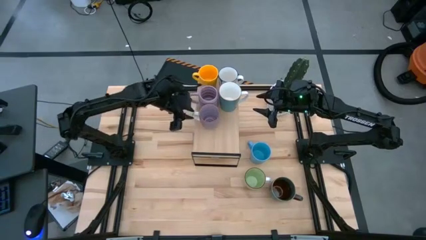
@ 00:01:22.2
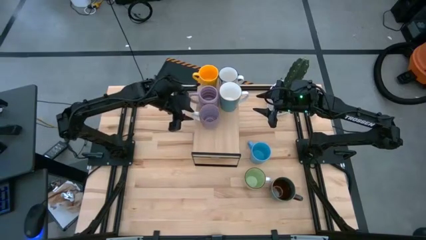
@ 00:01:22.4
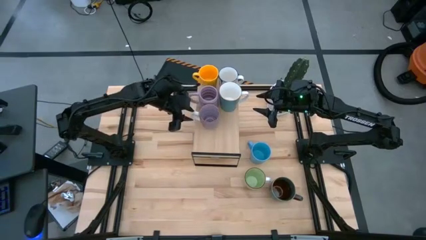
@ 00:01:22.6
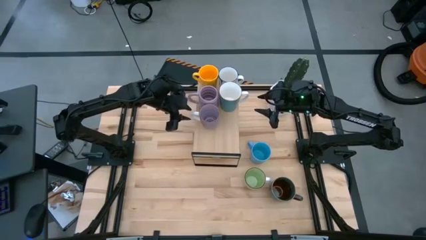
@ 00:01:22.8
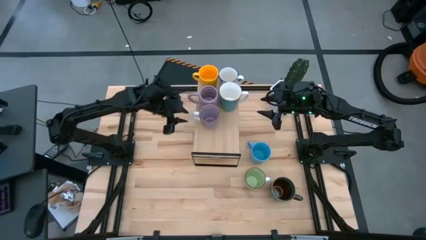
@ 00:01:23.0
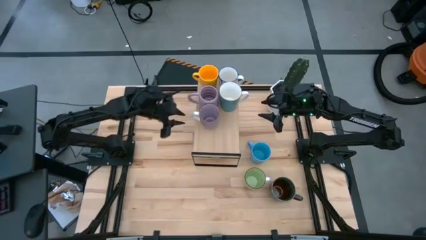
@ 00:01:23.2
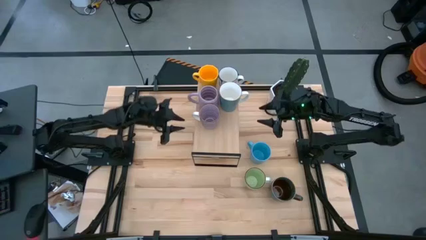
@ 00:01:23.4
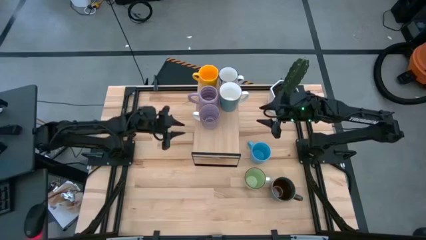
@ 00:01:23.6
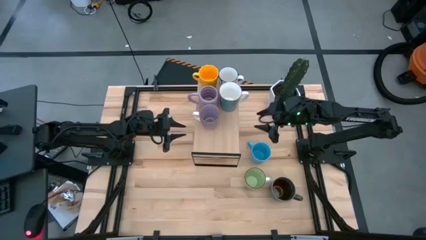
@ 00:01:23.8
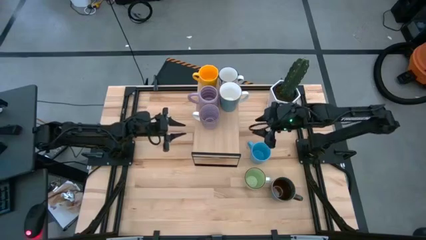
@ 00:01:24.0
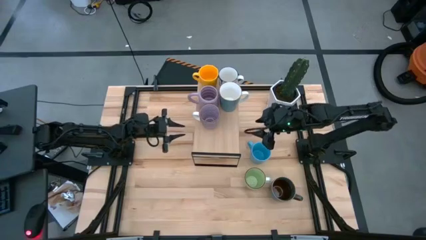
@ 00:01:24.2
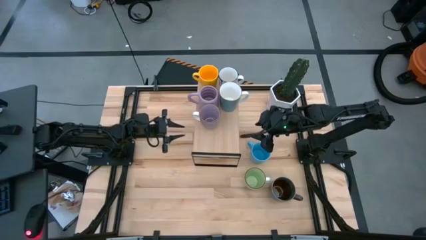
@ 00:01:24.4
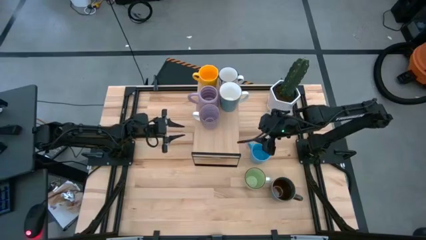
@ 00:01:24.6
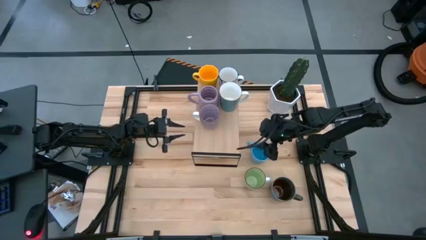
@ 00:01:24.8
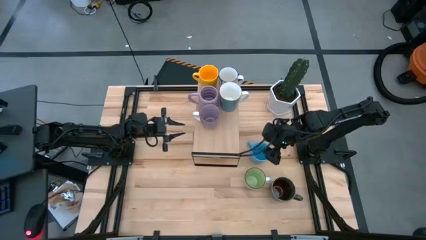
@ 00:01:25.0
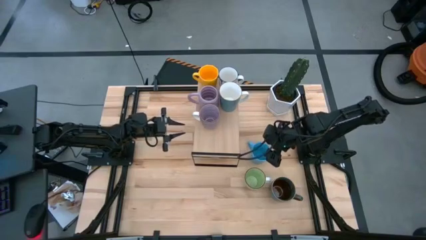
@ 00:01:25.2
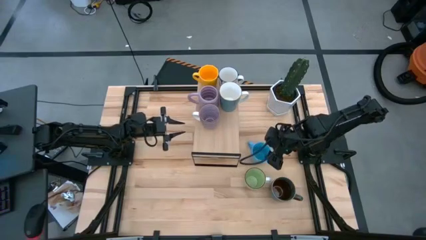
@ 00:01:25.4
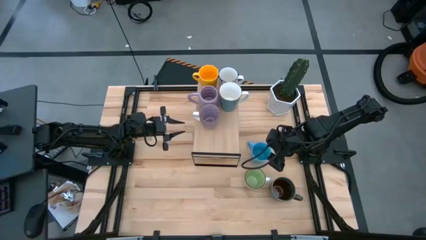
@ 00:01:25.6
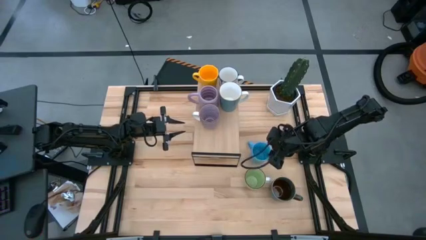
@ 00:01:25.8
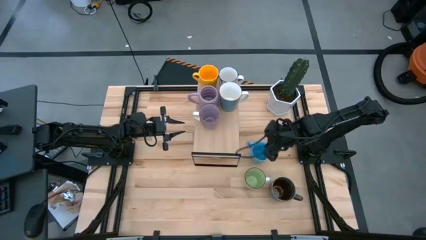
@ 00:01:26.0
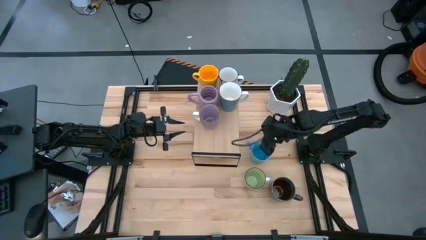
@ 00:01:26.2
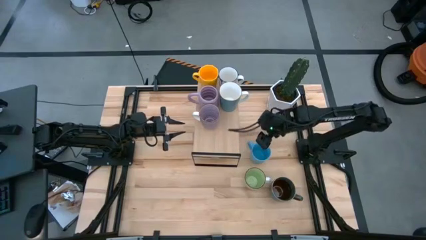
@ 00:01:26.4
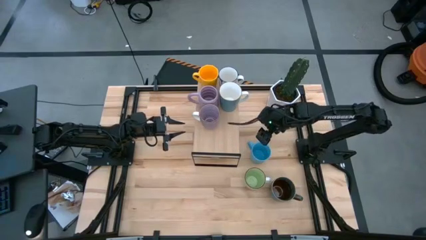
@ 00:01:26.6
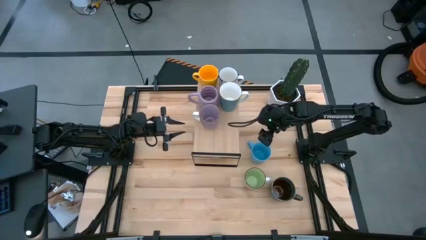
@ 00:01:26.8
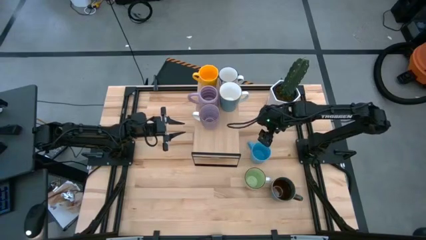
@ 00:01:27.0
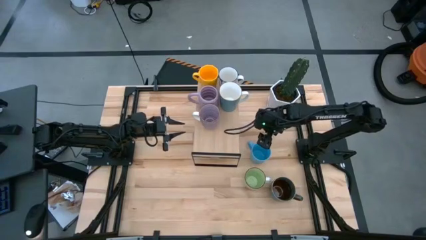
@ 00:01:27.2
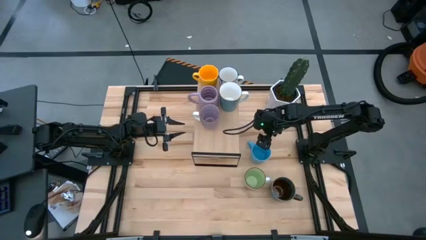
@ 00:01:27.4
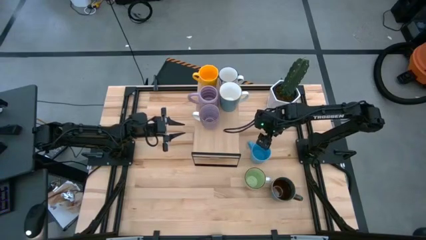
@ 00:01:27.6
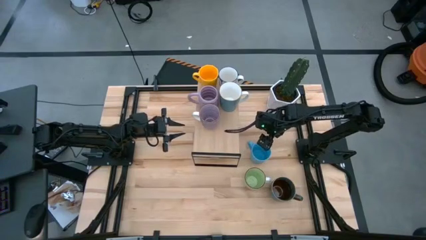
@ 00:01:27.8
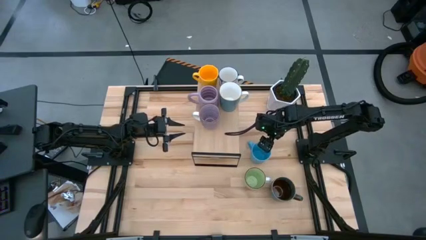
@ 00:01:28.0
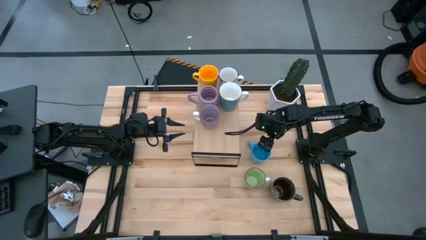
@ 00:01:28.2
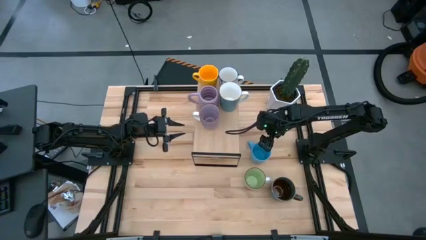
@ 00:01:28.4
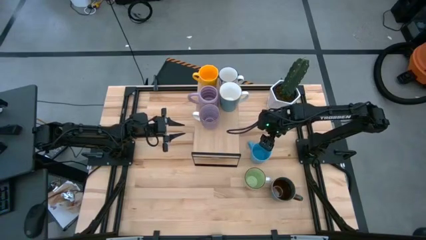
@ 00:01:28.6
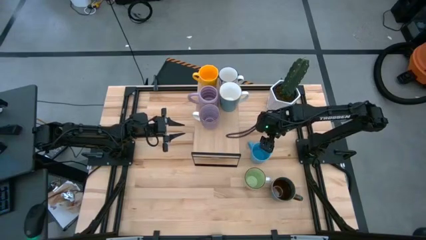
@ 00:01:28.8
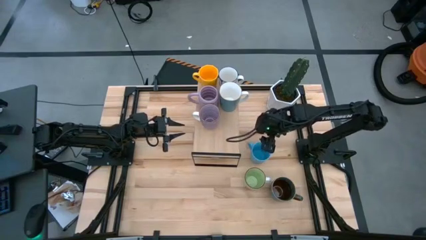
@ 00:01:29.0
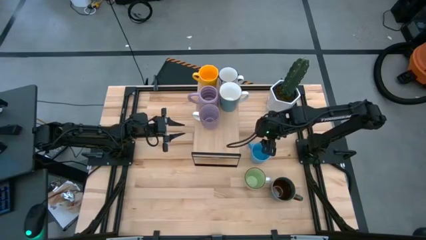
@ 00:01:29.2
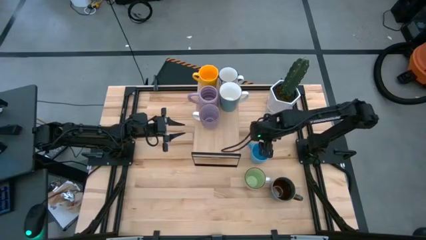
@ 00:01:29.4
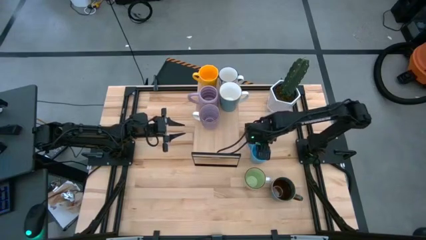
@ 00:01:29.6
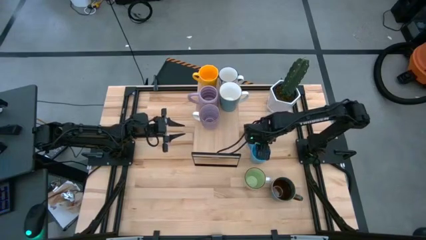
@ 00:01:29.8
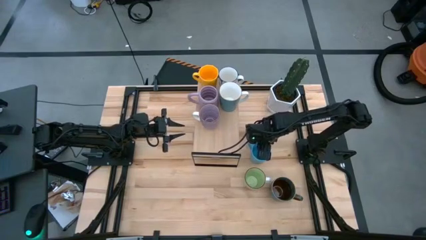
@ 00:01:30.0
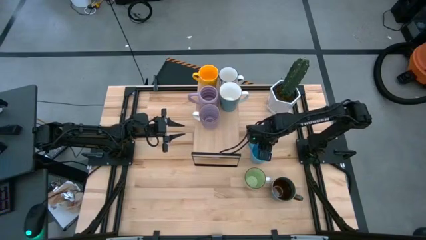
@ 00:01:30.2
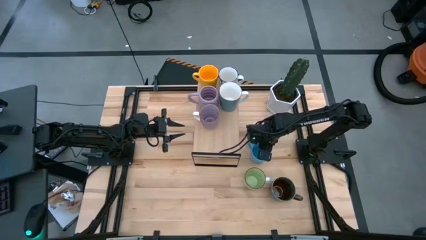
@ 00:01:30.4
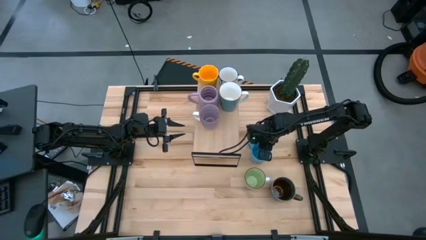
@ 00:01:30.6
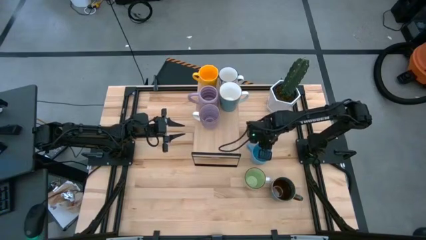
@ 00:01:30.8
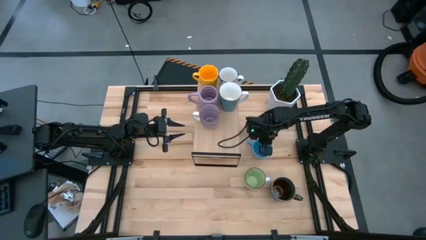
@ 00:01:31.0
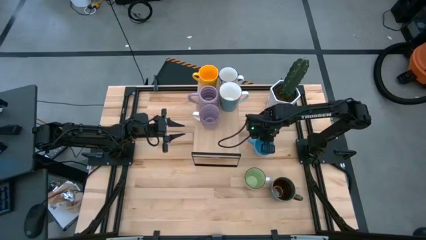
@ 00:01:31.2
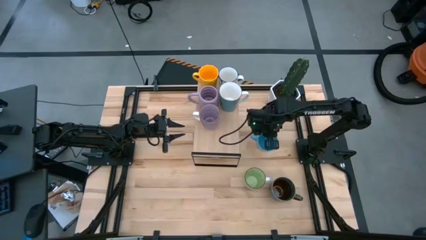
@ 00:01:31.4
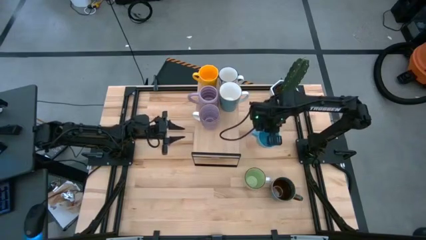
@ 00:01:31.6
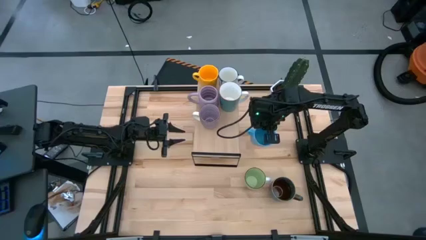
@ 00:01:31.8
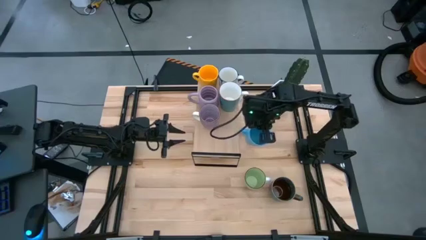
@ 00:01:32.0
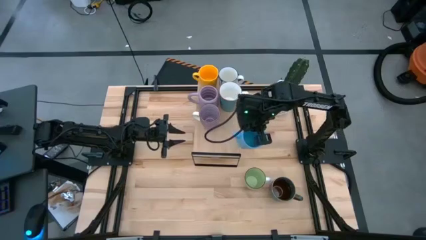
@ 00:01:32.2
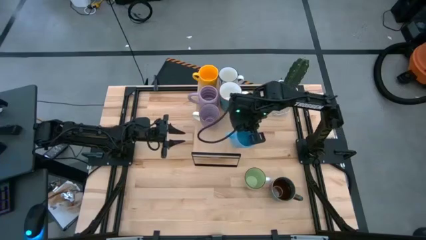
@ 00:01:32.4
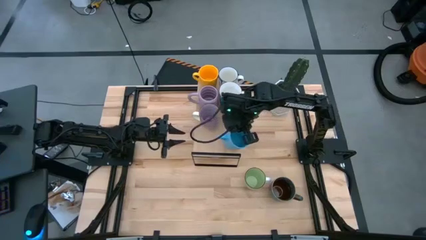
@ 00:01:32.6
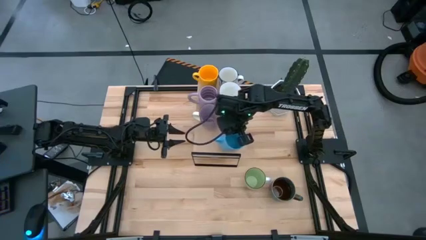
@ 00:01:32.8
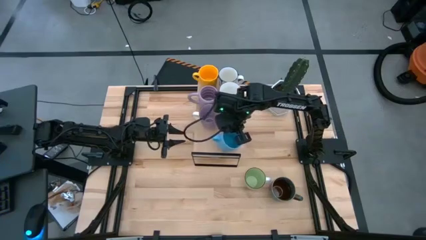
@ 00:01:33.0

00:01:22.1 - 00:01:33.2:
Task: Place coffee mugs
Put the light blue mug on the shelf aligned with the purple mug
